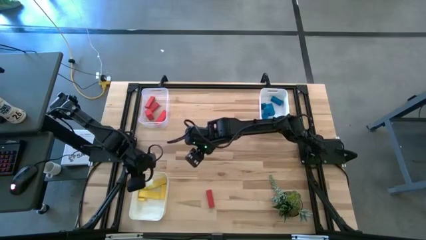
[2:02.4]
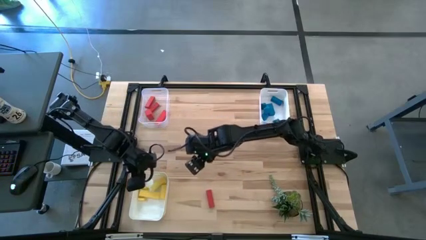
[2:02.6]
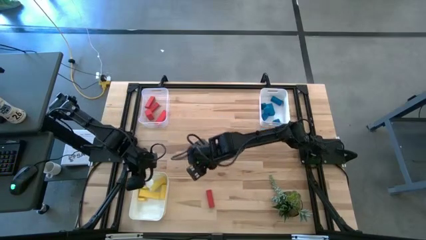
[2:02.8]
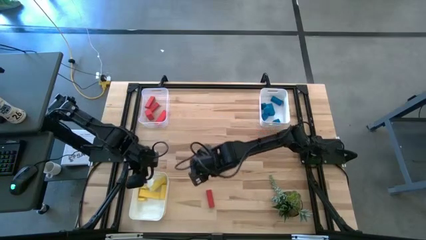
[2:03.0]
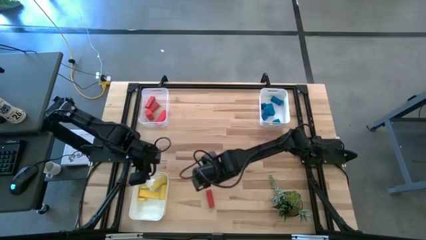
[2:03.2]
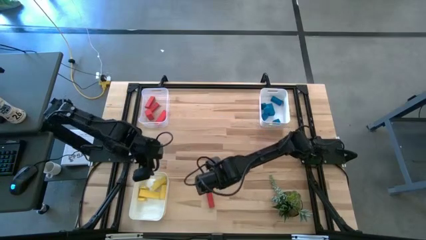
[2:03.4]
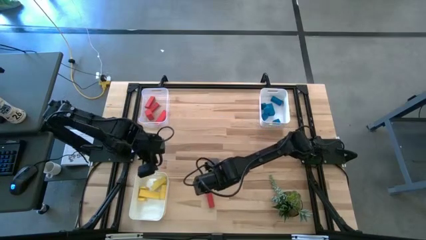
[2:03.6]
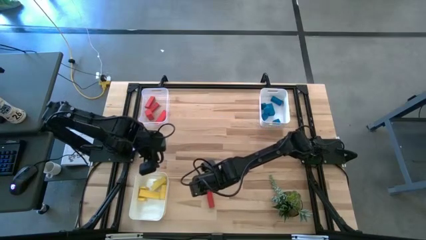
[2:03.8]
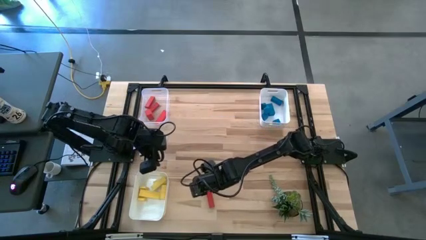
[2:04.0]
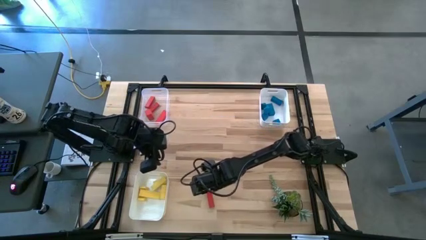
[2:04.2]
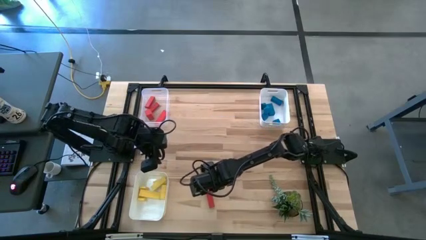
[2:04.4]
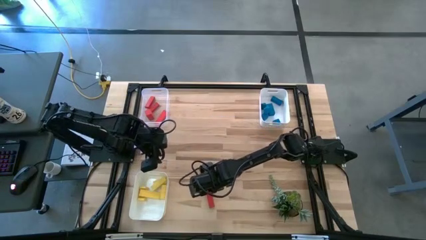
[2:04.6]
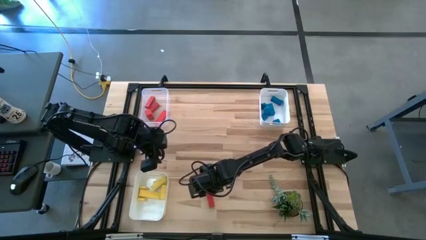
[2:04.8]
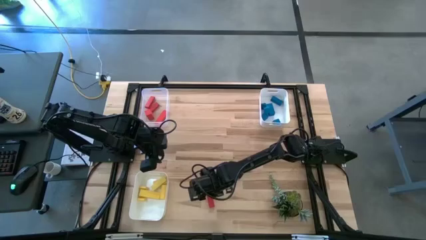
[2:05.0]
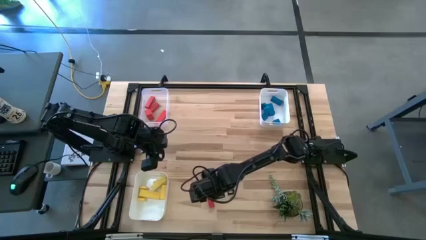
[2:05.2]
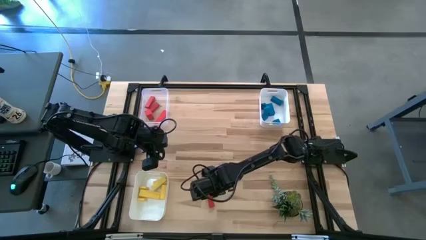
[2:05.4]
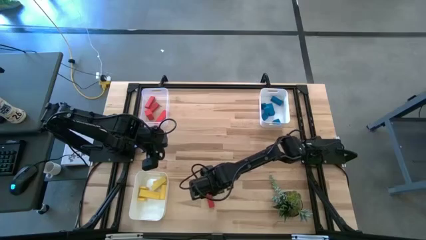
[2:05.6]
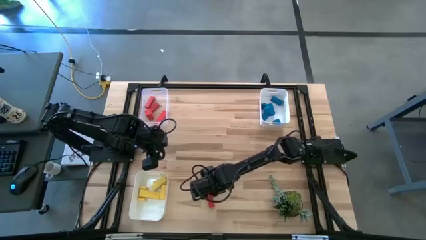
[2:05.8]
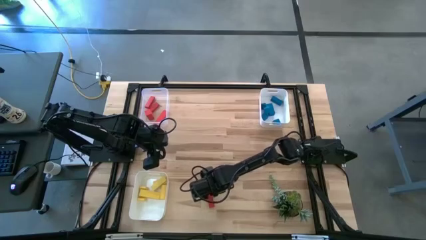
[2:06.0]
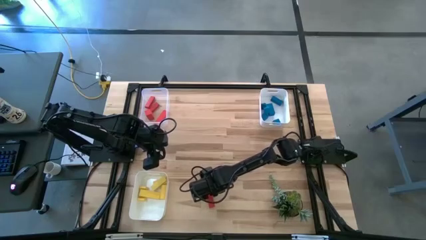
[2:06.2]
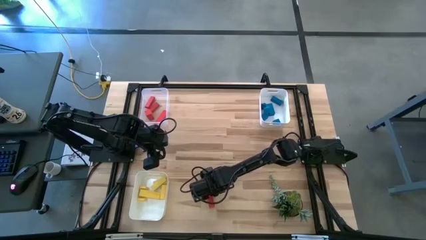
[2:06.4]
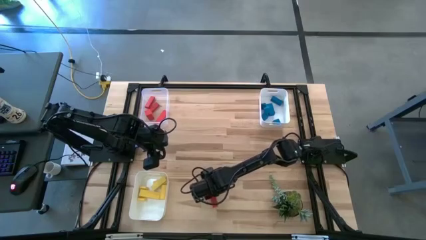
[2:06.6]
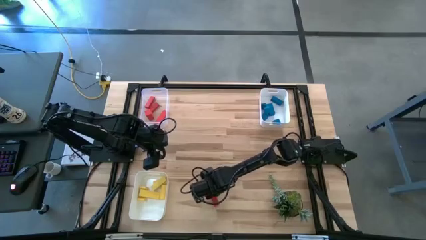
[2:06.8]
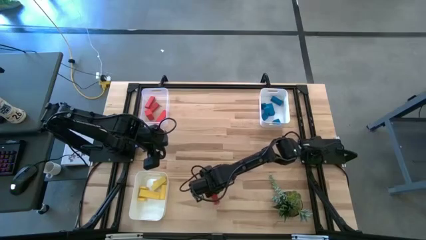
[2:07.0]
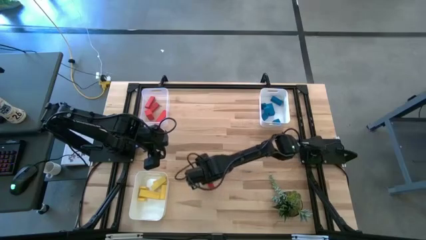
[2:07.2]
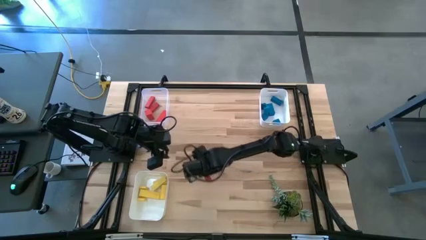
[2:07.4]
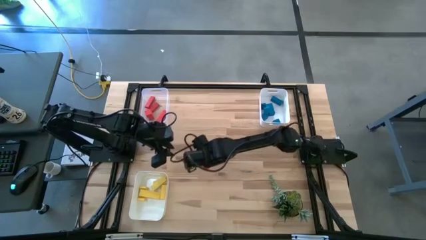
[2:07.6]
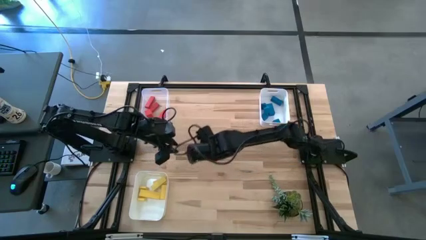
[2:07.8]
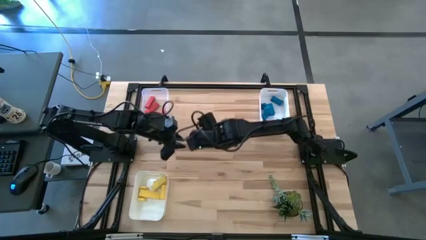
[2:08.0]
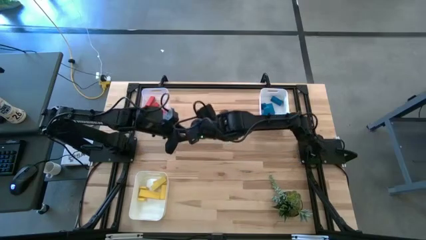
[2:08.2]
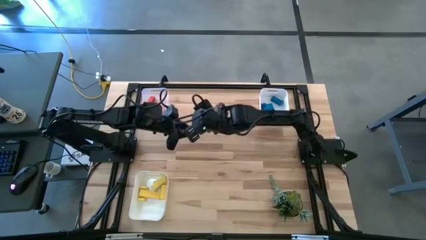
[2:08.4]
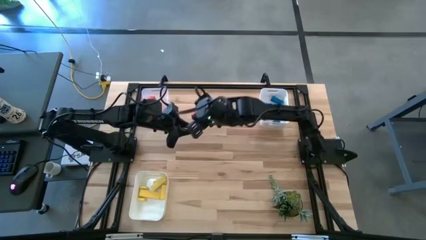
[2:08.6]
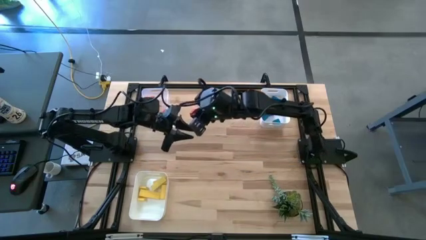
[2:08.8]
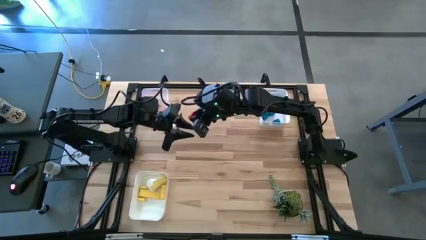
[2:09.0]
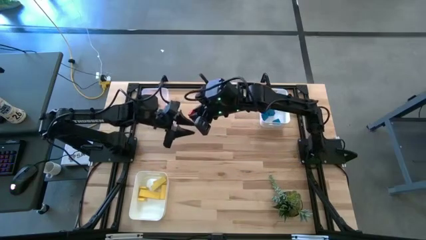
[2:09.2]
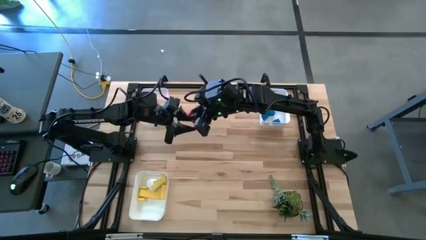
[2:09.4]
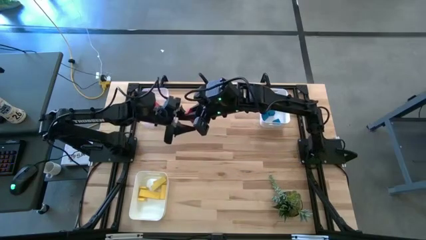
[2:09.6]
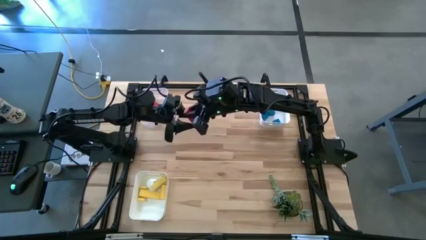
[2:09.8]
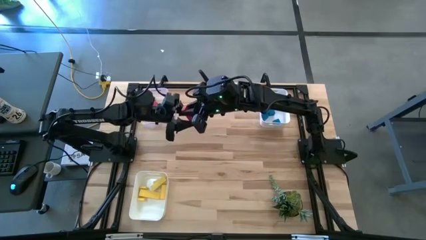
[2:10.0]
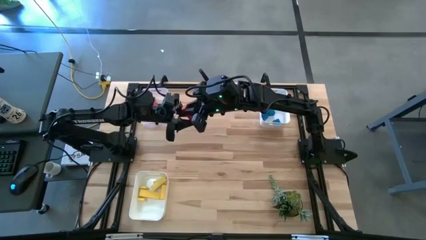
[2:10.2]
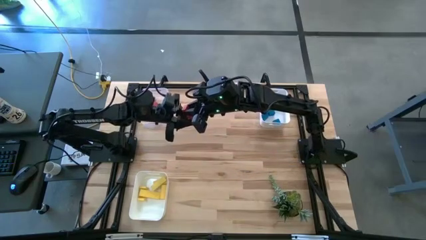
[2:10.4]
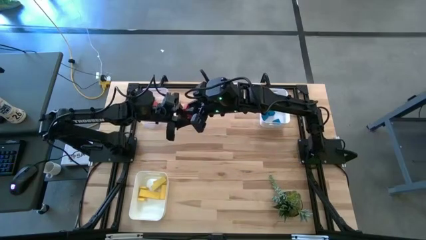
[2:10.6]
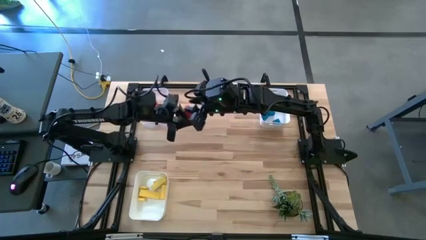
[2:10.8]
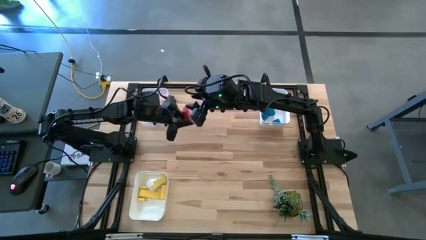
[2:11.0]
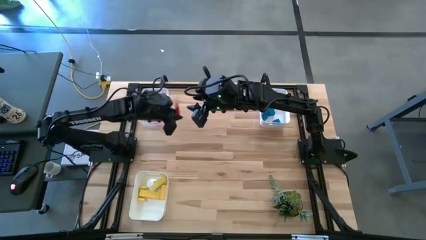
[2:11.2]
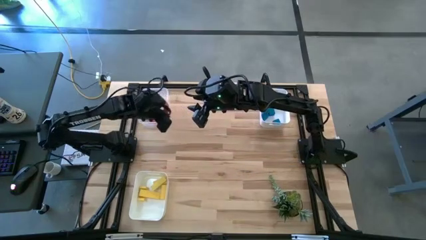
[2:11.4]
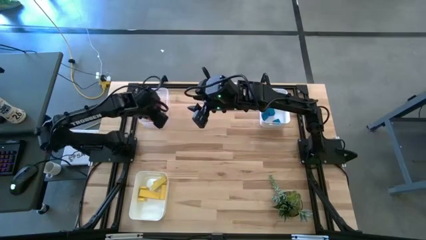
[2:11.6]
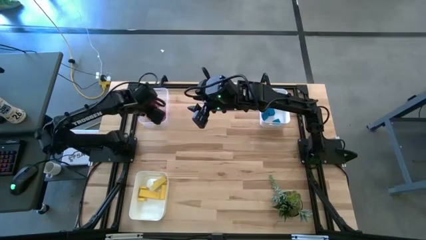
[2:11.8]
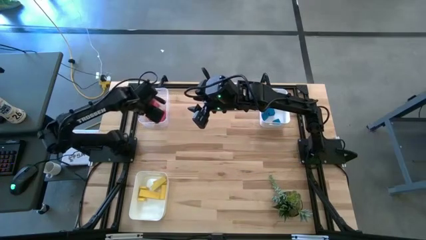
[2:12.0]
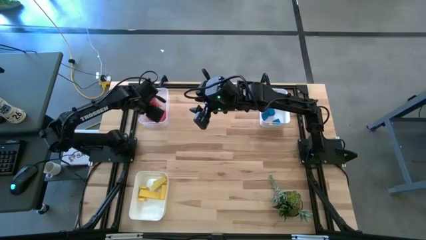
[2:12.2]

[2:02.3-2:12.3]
Task: Sort & place blocks by color
Put the red block into the transparent bin

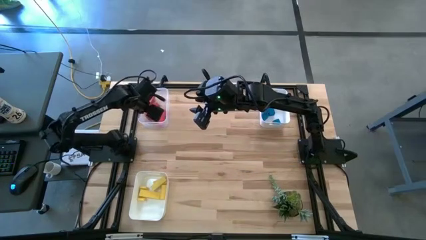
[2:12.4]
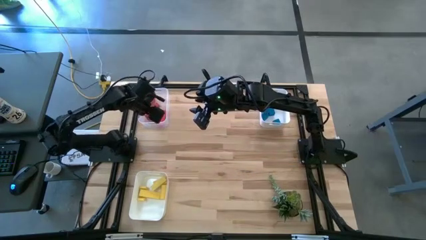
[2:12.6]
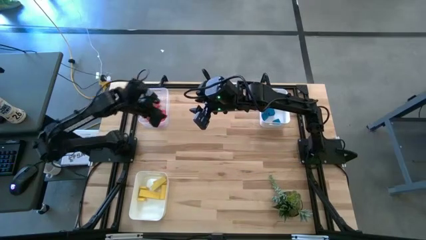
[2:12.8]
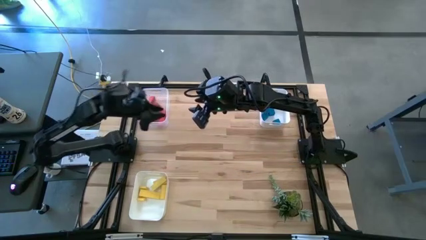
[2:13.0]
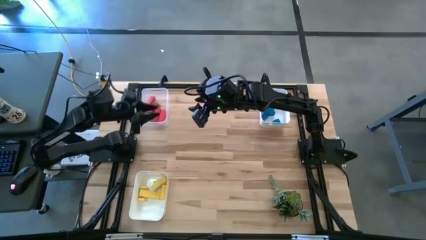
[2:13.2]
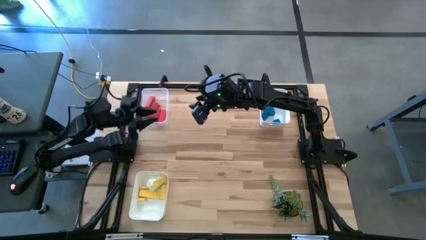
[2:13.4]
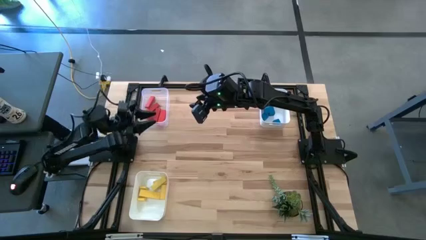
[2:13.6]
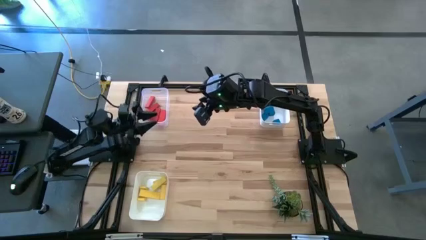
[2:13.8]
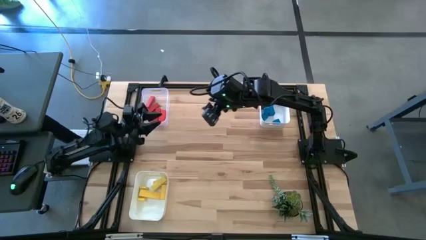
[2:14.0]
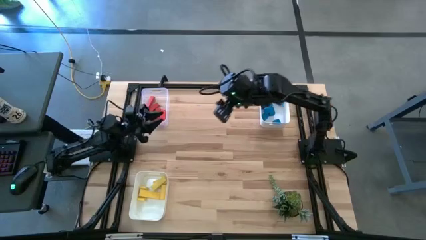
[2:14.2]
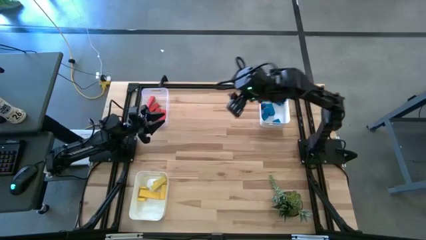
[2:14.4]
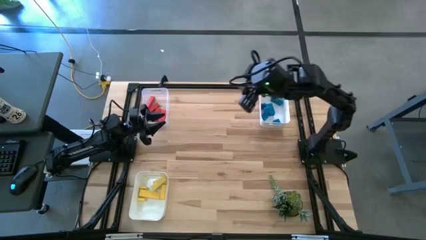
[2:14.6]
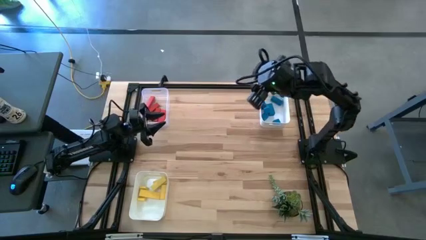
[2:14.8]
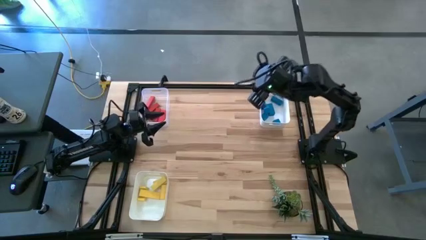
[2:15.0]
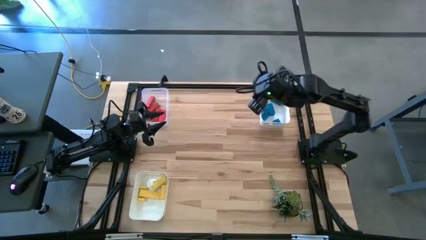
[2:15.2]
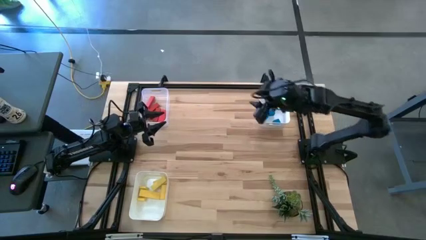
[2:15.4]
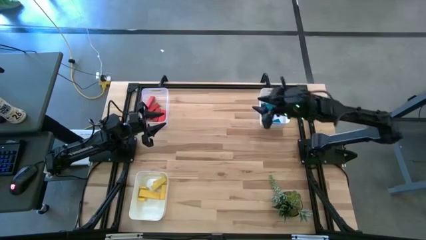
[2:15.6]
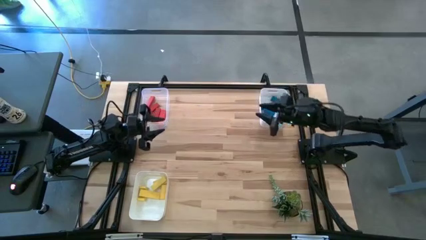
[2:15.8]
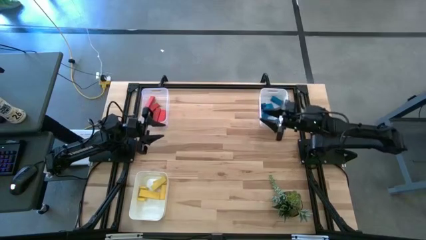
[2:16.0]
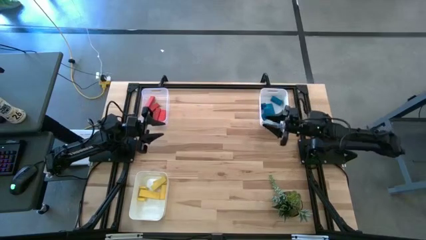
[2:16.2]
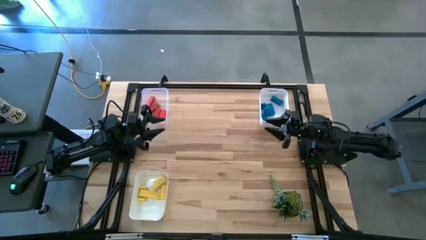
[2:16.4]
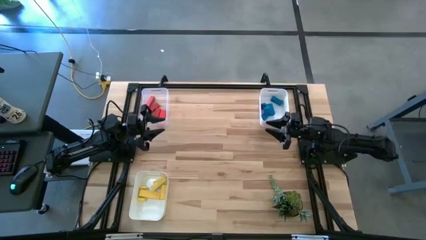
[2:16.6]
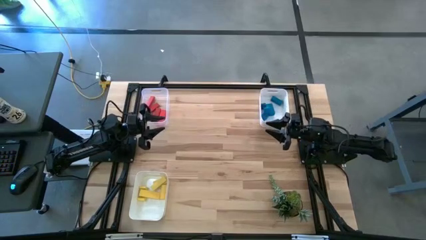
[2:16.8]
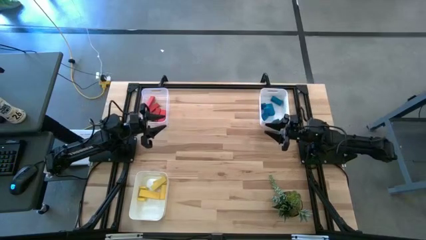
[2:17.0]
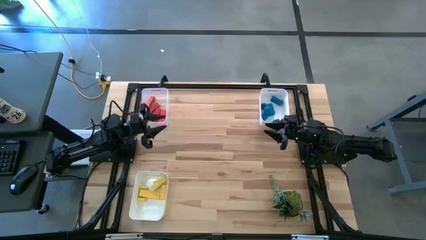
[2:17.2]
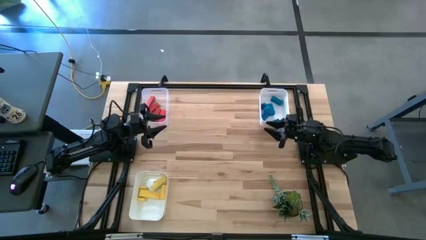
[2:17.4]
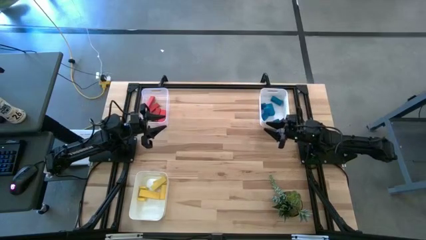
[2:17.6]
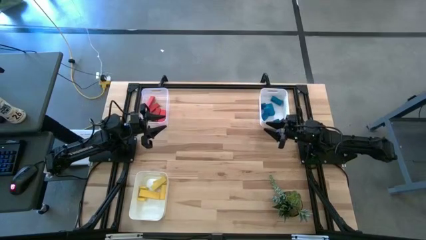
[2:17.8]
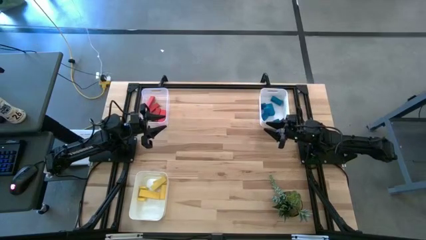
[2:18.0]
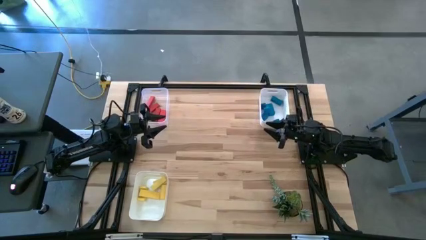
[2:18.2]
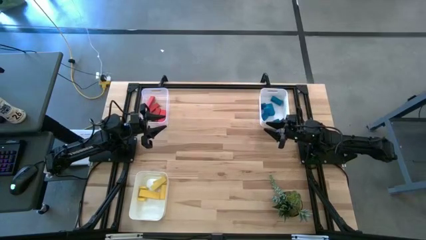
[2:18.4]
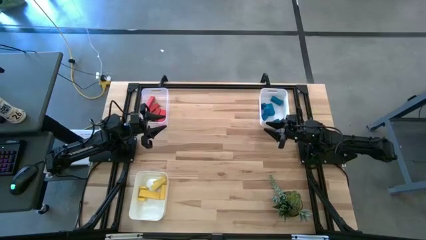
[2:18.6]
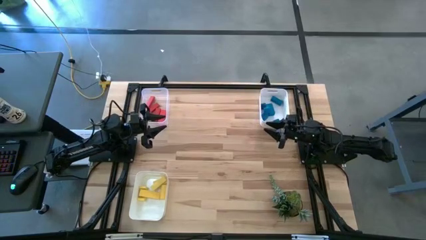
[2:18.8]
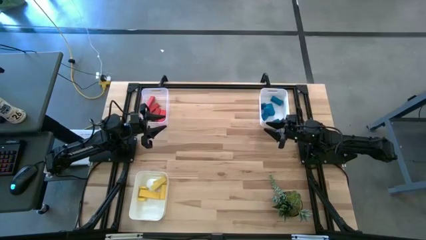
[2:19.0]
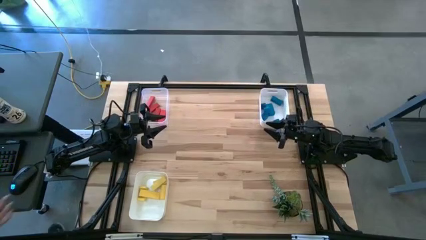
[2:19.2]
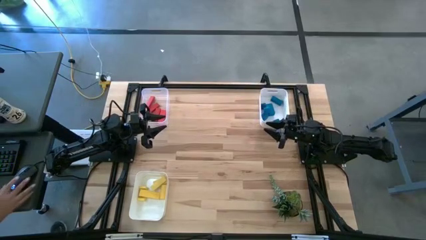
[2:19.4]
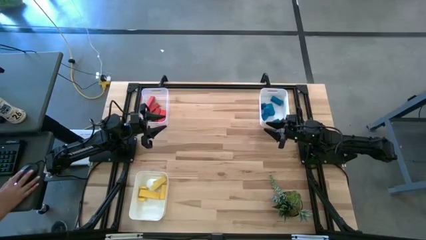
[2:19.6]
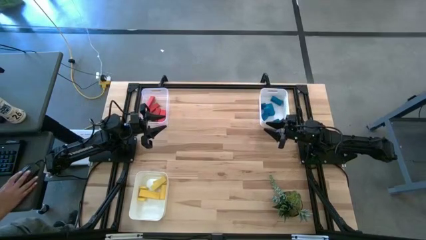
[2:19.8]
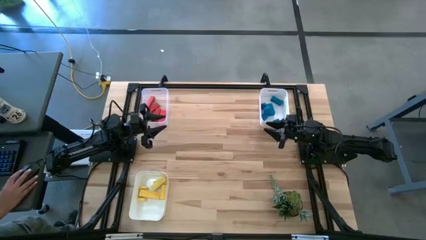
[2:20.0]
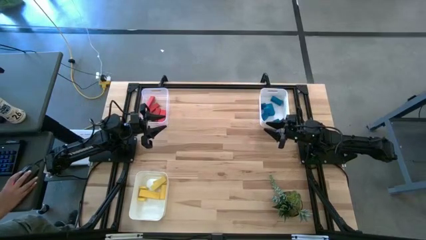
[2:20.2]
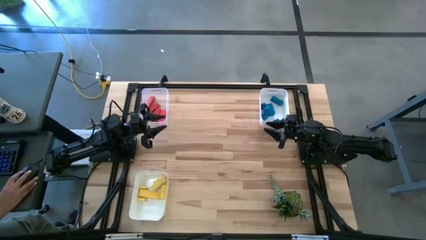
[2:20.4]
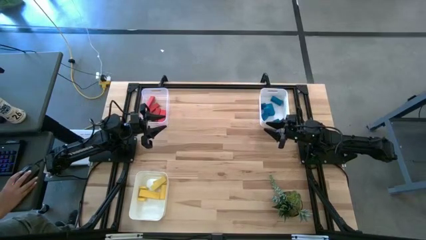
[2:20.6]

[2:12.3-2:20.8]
Return to Home Position
